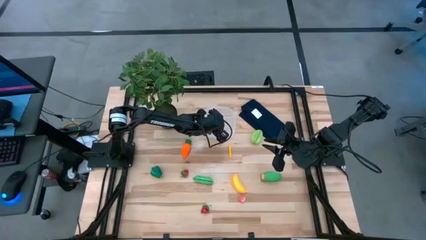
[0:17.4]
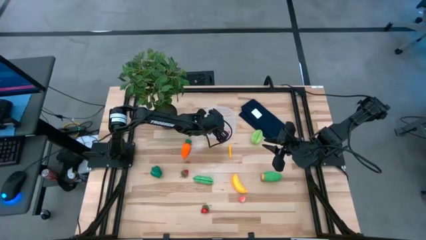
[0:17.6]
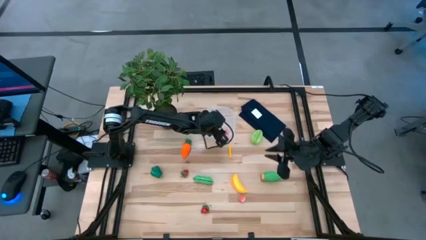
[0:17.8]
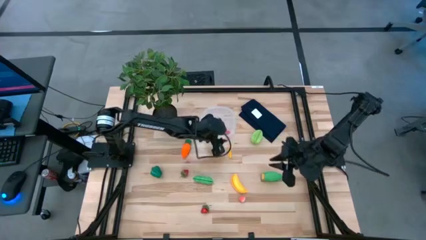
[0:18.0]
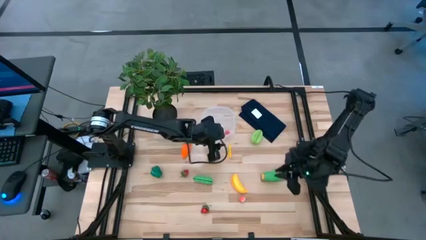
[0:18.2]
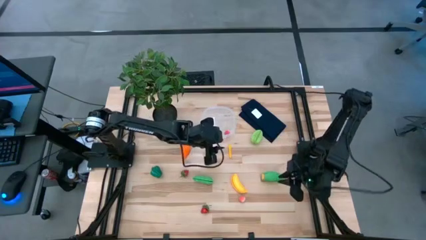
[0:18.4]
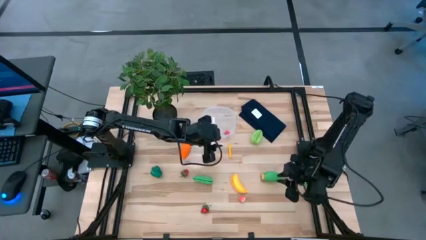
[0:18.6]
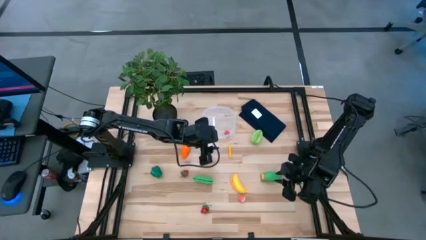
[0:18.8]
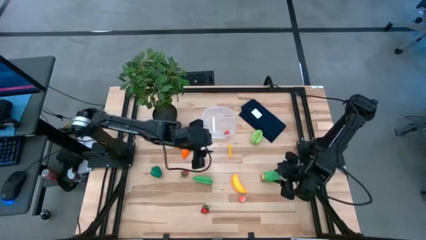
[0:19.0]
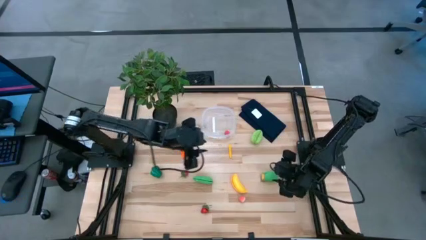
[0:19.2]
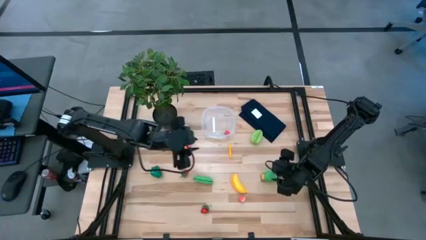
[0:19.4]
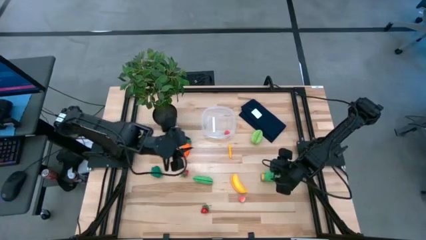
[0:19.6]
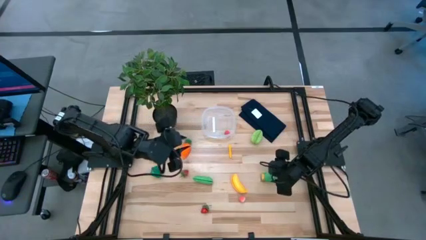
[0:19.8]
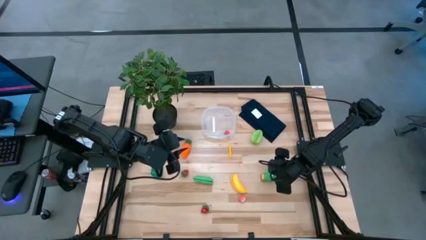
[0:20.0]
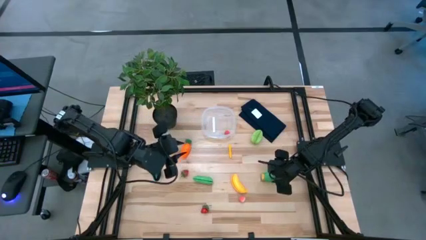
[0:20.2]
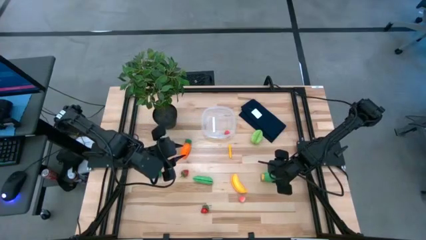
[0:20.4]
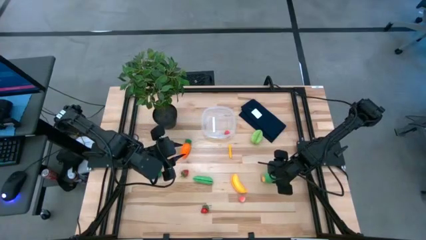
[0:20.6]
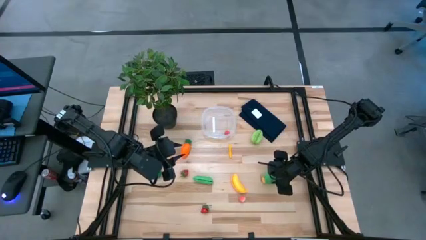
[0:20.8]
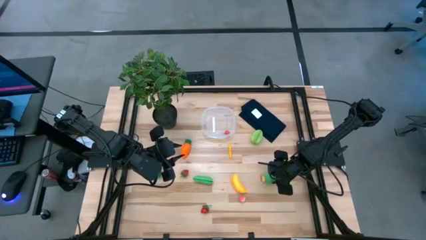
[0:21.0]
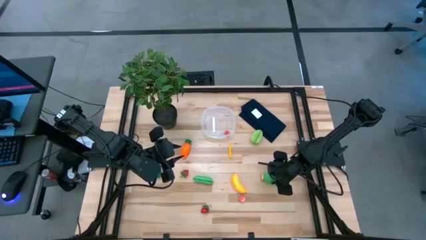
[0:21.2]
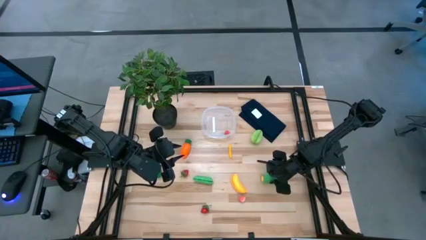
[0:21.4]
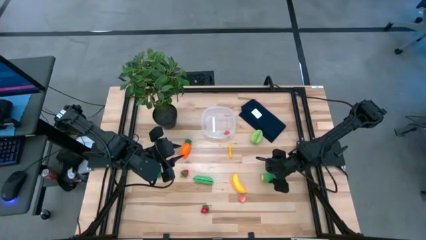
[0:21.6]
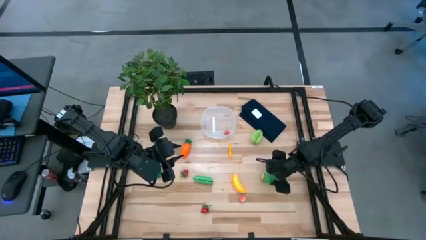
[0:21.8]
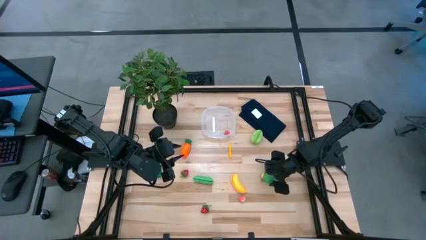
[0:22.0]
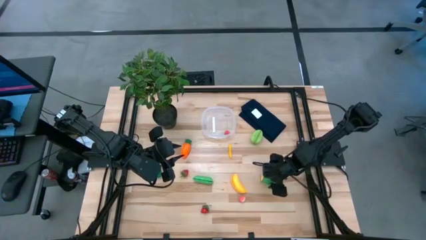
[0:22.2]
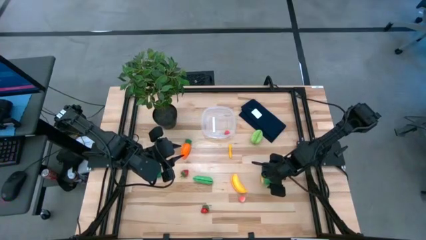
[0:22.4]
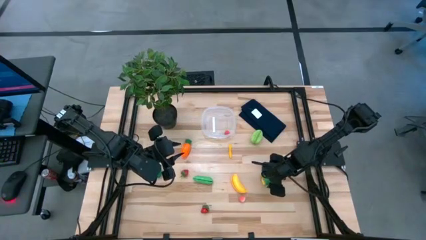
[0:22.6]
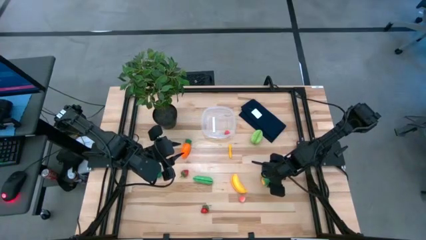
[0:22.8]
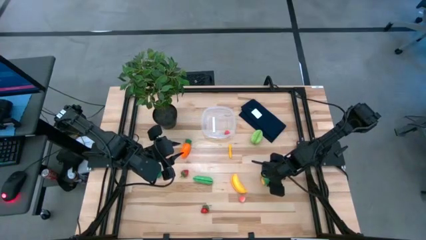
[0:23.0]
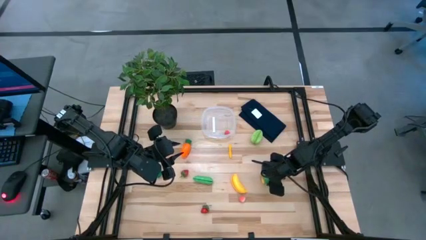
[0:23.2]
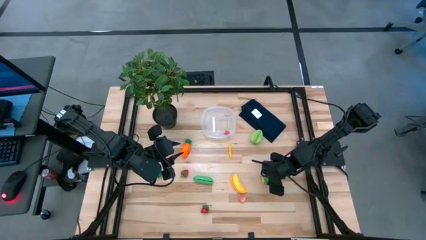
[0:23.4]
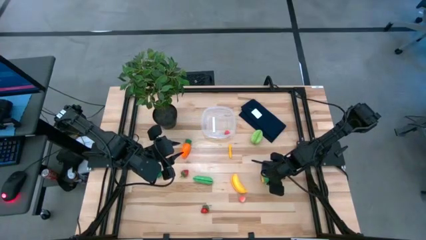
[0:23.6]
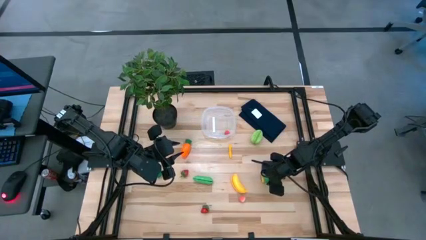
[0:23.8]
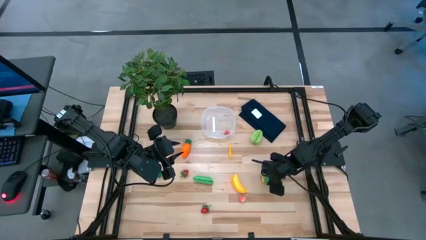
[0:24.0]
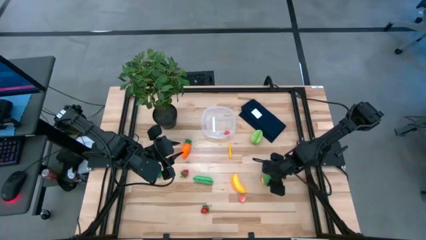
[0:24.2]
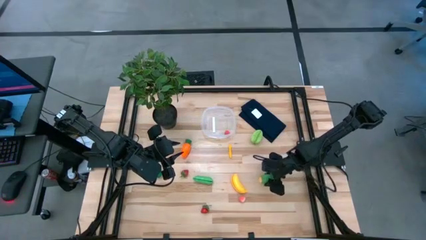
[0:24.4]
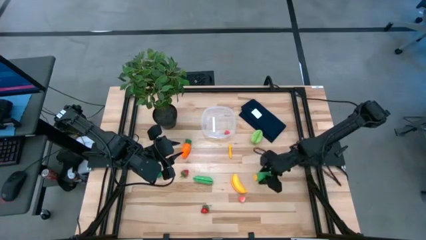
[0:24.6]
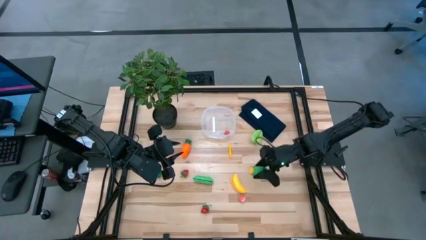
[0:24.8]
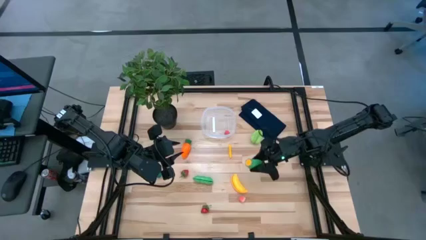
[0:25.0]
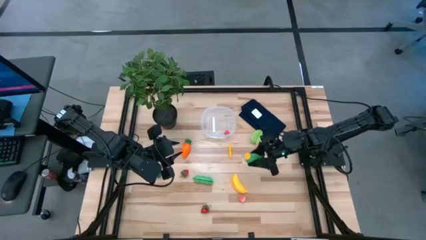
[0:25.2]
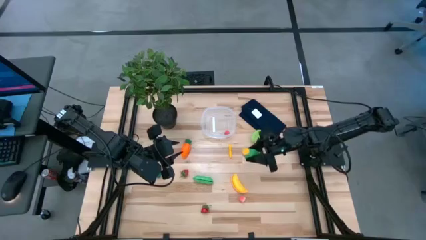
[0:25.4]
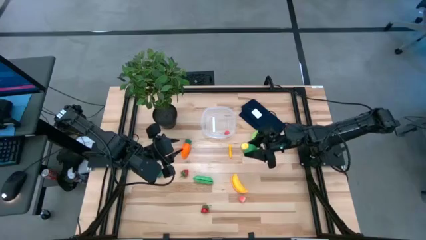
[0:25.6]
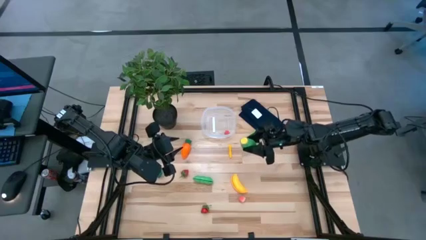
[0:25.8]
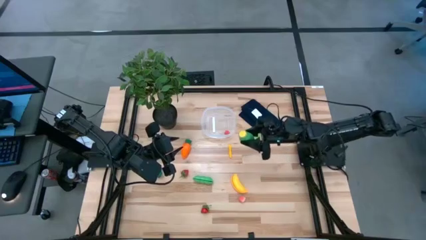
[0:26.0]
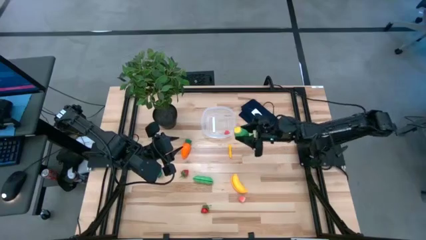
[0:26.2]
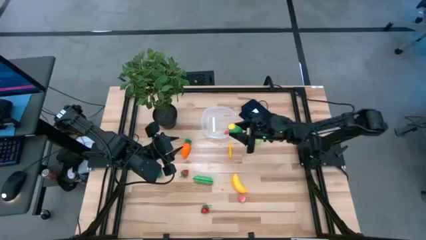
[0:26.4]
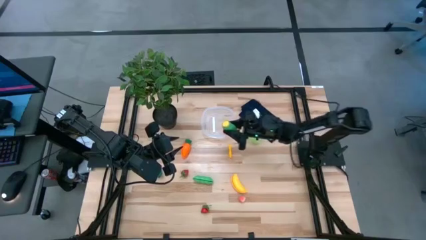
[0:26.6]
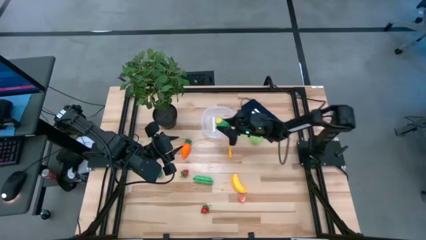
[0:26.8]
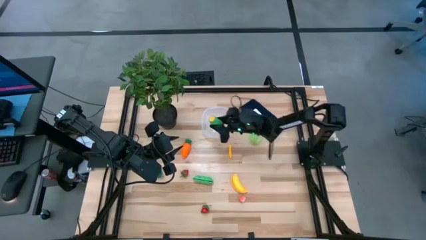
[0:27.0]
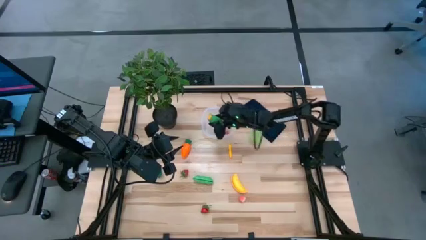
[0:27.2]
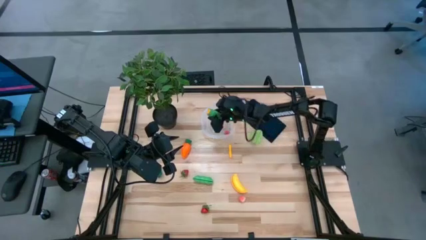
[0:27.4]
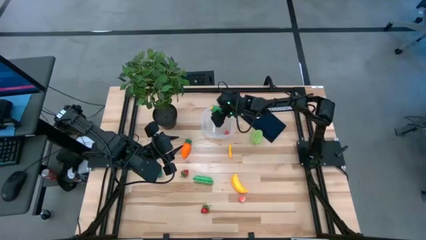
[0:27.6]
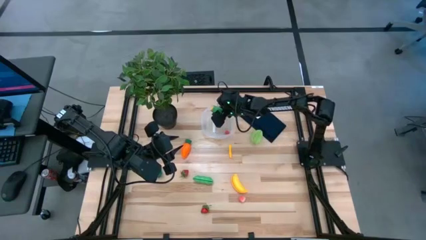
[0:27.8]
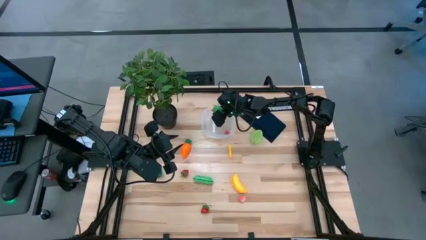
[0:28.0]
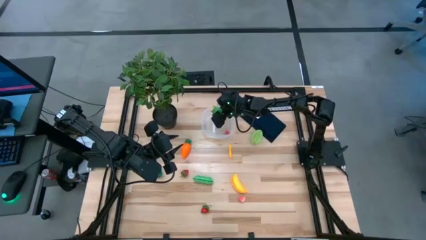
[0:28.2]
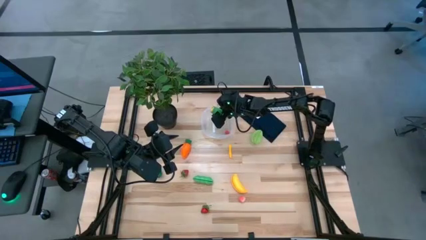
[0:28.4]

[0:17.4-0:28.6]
Task: Pick and placing Produce into tupperware
Put the green corn into the transparent bin
